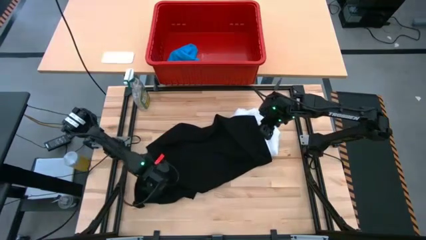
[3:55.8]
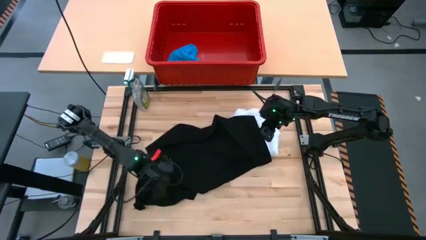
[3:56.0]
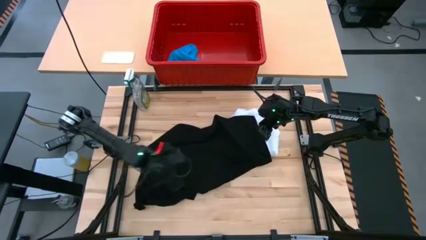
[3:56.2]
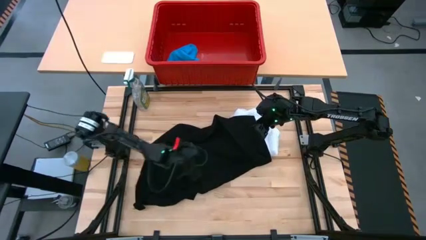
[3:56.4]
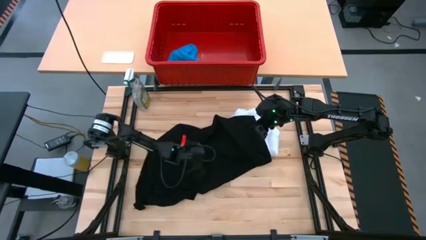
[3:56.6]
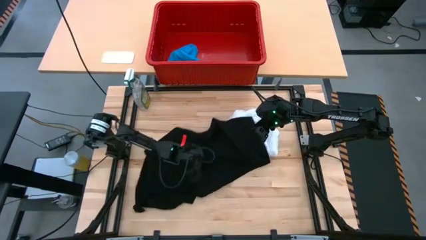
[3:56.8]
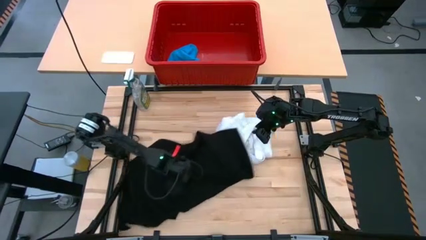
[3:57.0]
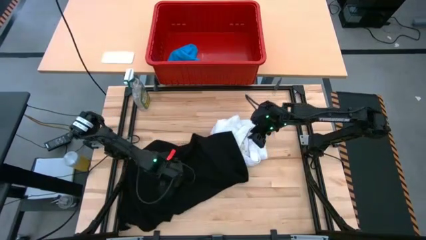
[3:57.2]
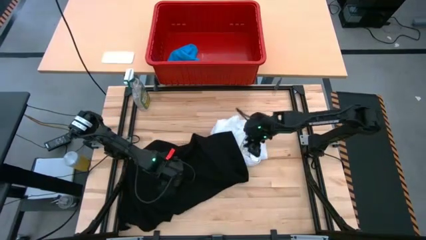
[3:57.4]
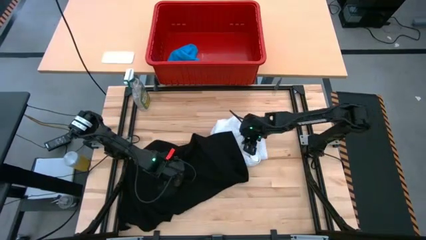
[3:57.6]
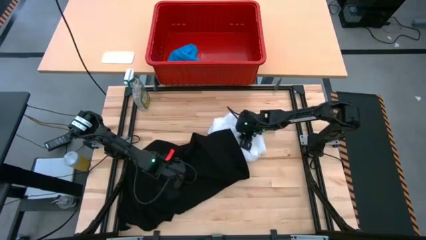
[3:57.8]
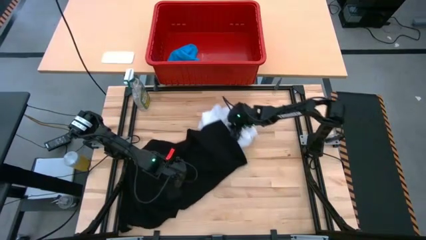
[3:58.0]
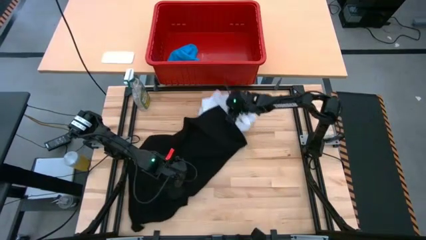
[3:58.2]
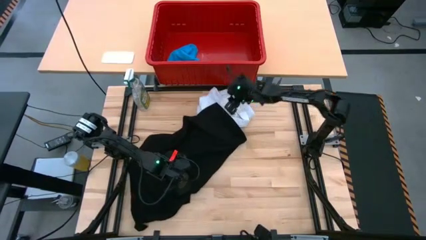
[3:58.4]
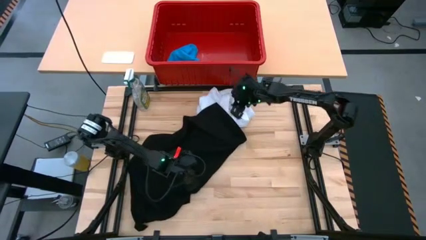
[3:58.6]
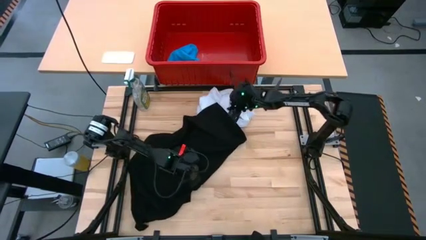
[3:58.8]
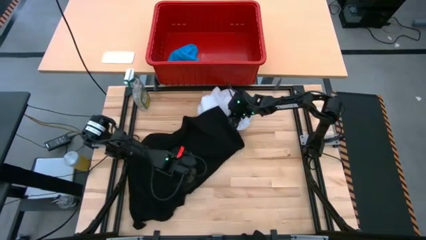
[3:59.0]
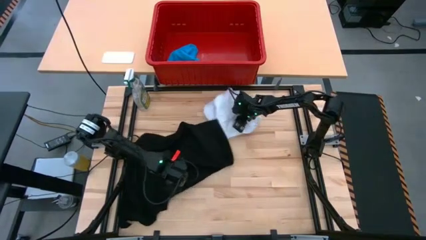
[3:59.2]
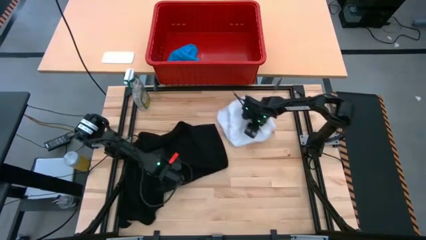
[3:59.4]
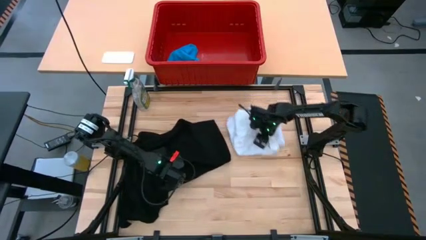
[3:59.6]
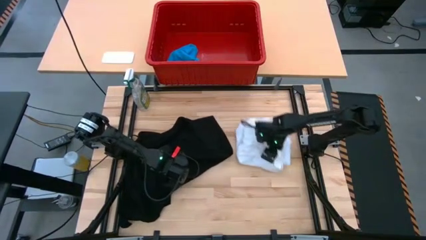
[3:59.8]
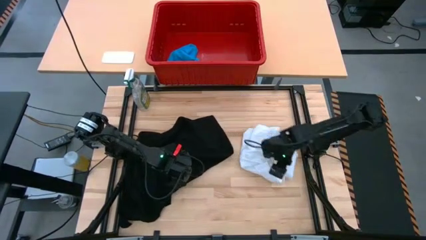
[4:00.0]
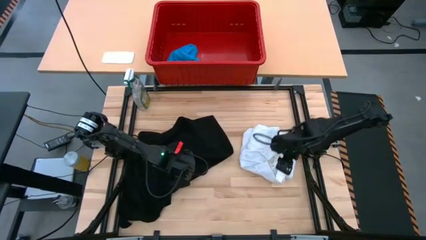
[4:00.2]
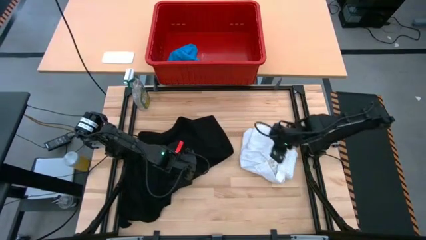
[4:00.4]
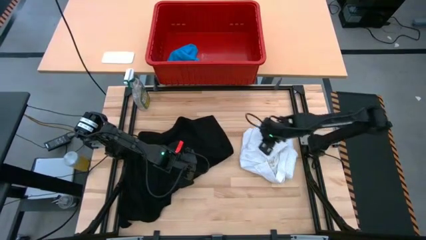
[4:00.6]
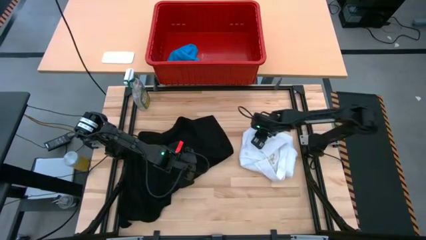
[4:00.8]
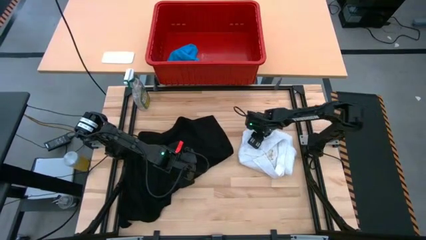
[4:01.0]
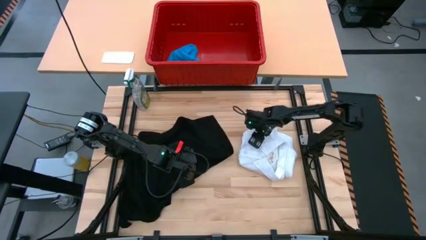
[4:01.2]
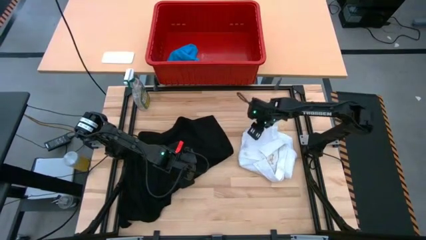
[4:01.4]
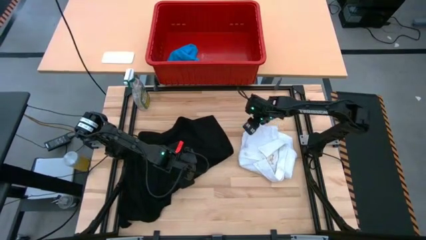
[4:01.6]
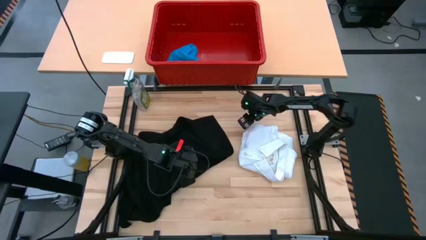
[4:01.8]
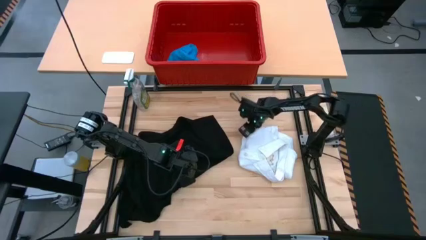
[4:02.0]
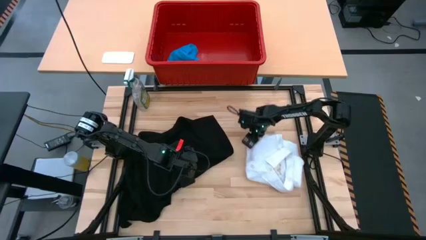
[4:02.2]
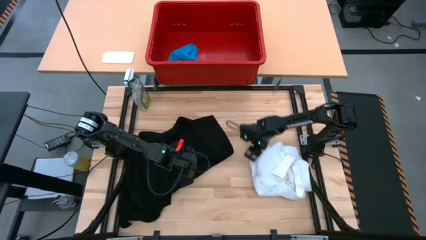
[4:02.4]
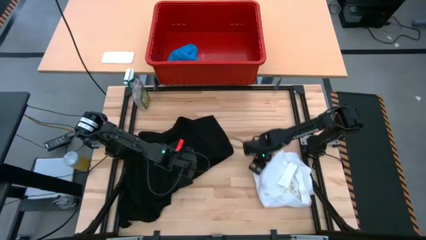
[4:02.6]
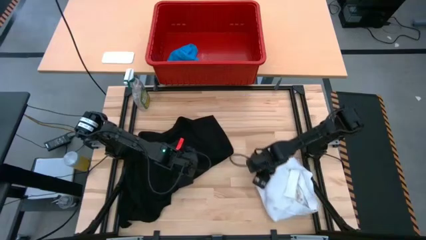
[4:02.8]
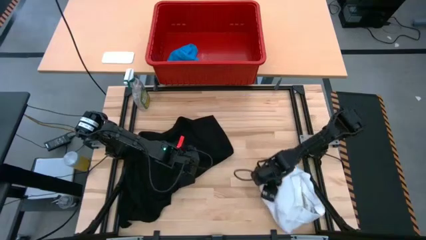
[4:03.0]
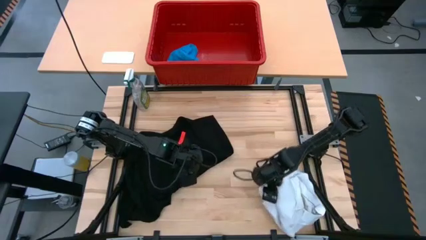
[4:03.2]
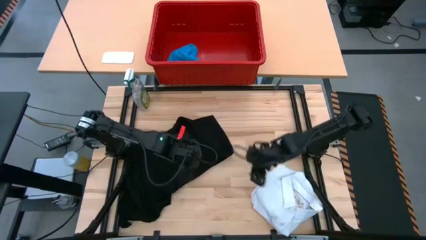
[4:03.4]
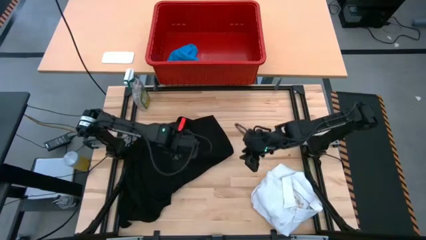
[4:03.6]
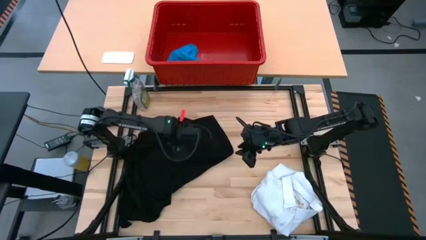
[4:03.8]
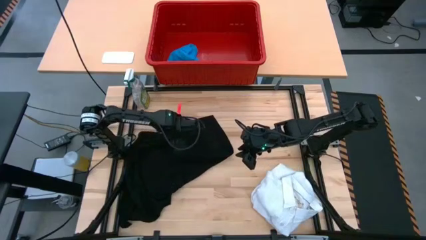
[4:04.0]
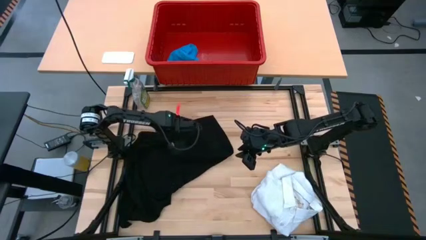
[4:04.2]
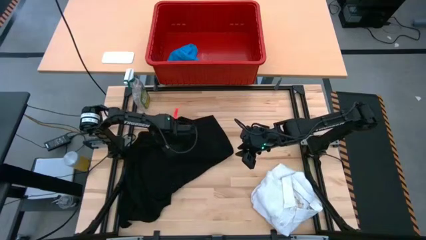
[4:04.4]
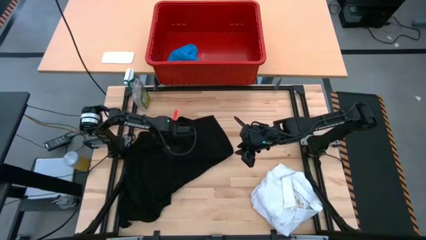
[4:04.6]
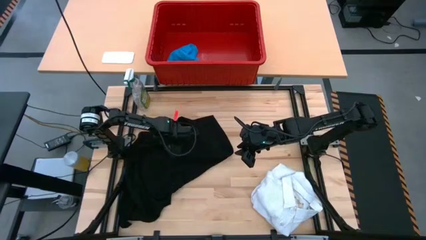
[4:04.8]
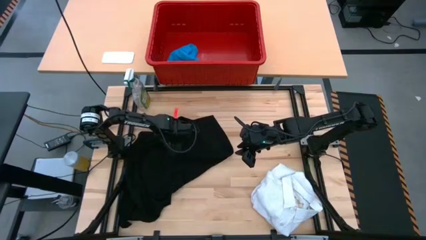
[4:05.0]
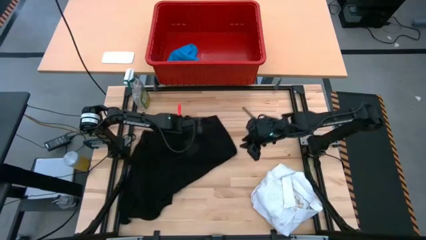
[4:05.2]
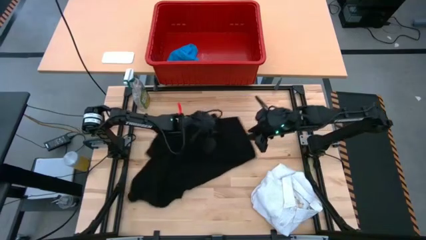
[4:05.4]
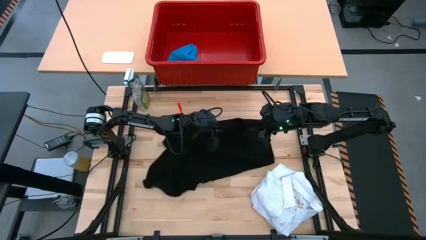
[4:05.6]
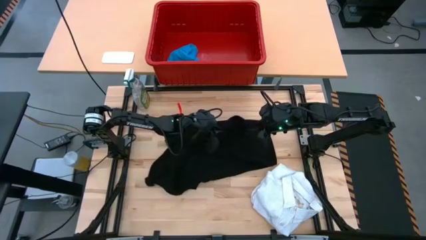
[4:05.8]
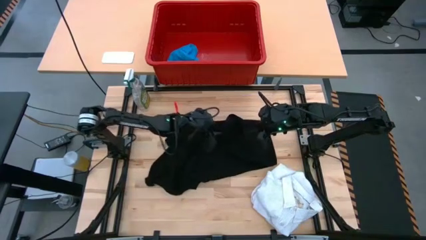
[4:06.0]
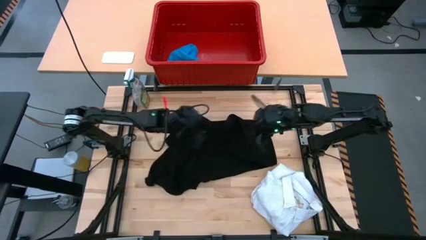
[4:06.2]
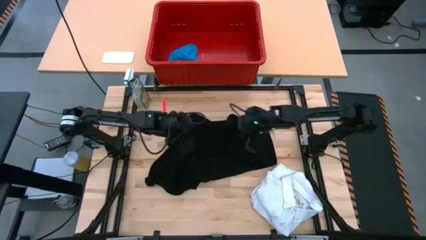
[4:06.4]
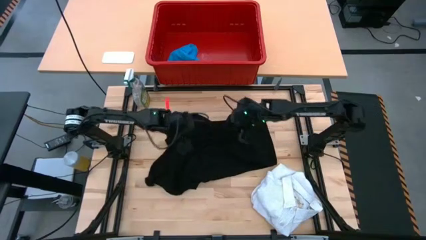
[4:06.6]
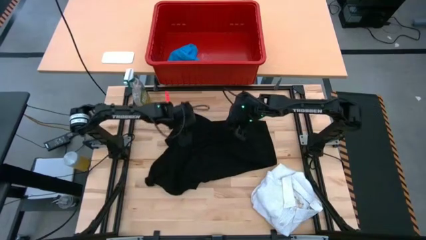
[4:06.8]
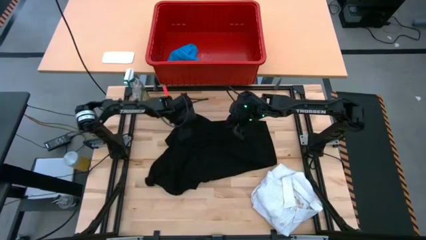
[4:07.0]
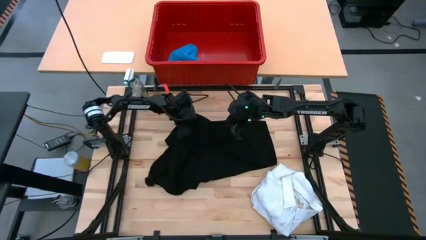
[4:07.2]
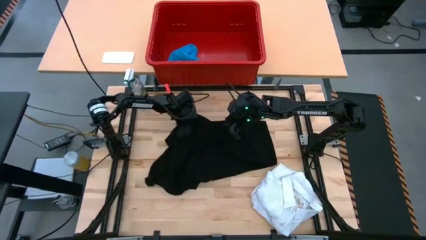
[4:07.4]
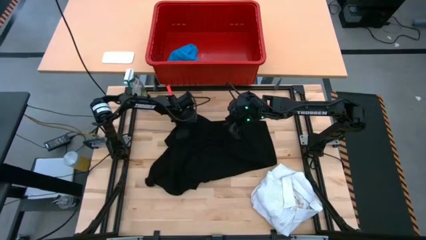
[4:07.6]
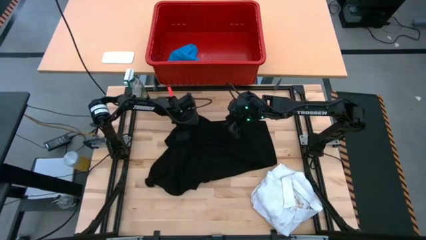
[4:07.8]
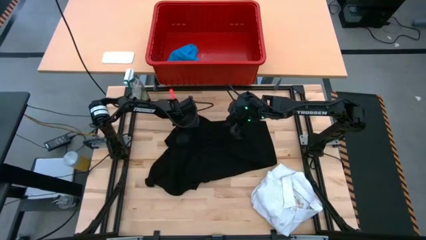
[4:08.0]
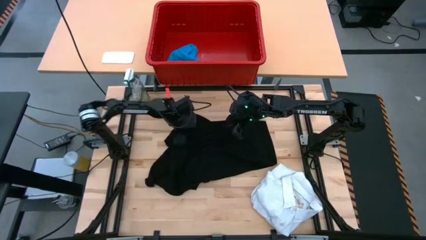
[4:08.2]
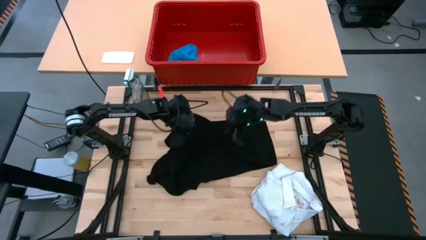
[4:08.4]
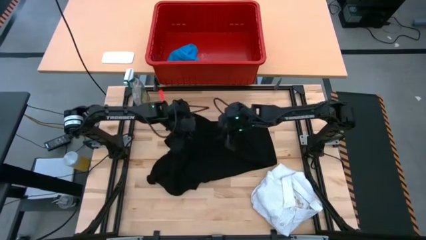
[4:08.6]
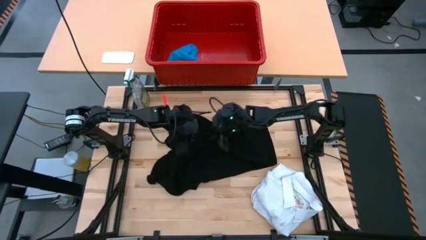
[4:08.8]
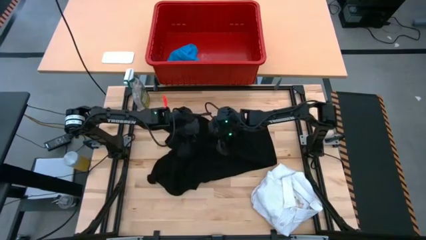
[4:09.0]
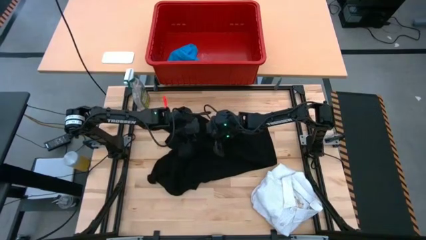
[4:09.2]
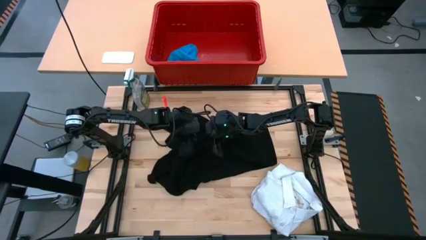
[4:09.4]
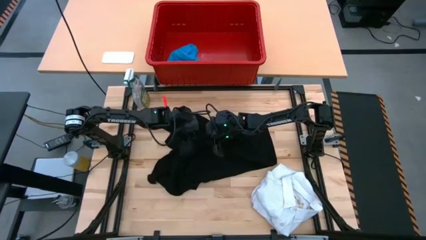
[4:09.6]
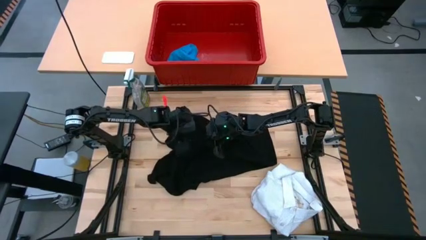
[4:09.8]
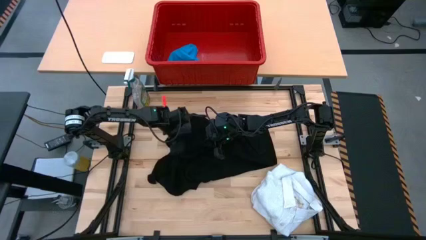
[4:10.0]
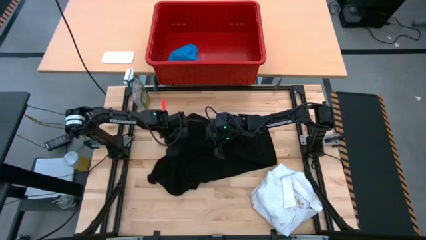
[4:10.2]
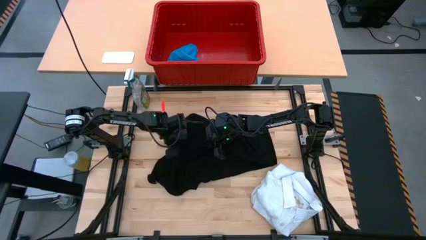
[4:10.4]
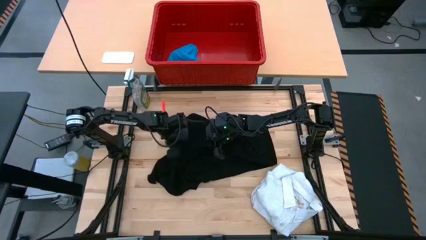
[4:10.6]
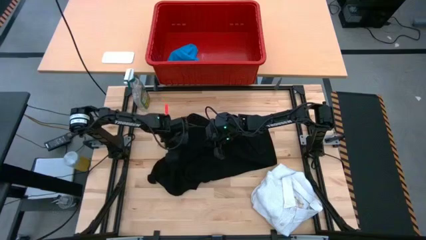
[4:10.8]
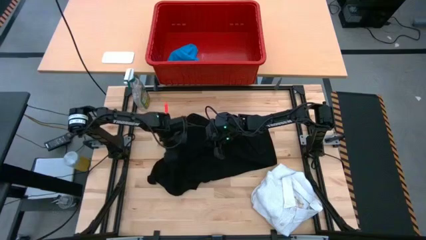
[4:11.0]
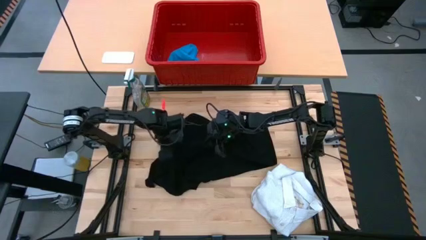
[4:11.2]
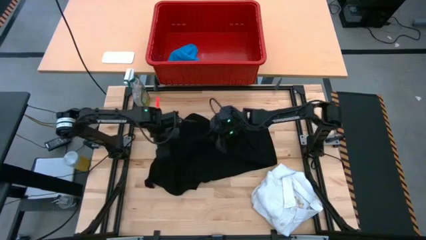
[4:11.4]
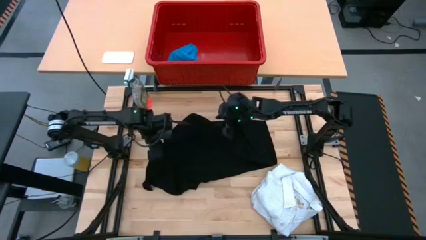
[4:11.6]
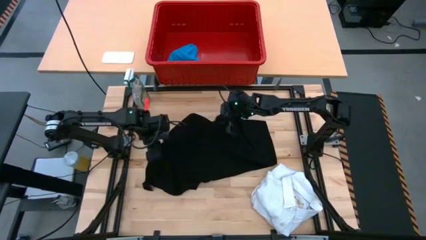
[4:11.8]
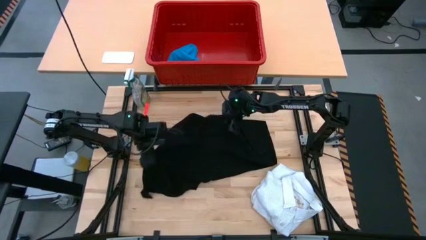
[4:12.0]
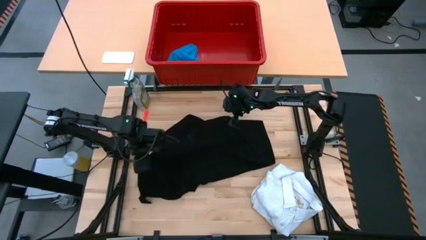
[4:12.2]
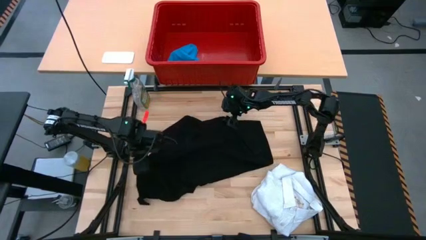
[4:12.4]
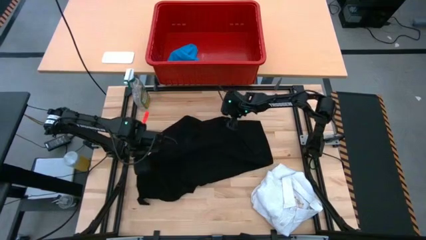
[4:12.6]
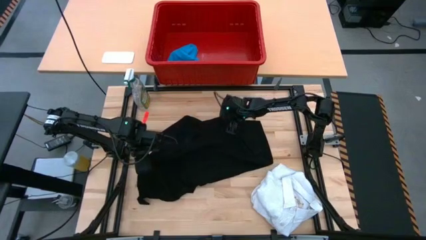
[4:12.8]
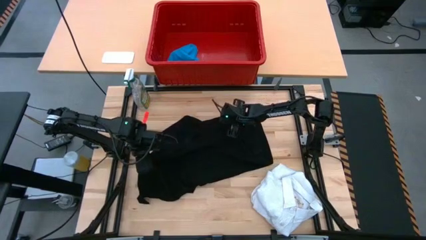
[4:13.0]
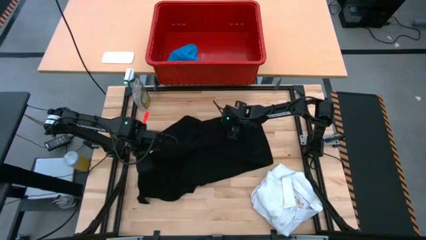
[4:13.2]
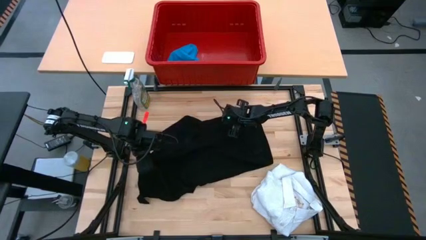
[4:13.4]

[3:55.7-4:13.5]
Task: Fold laundry
Fold the black shirt
